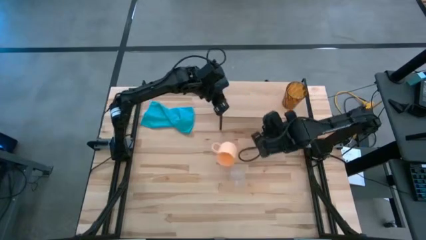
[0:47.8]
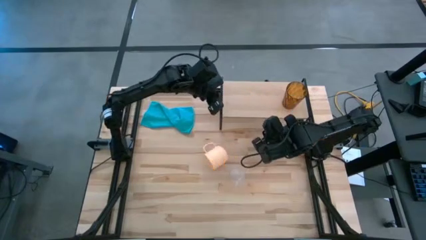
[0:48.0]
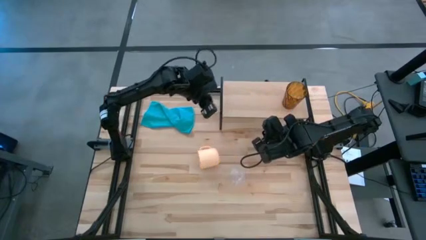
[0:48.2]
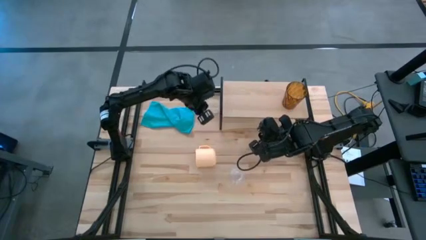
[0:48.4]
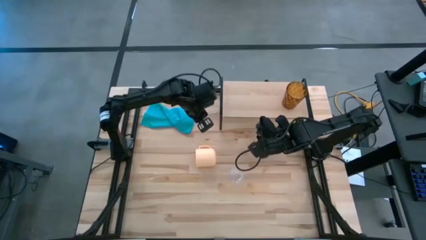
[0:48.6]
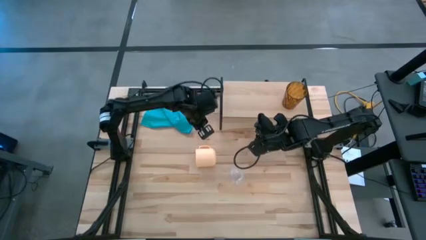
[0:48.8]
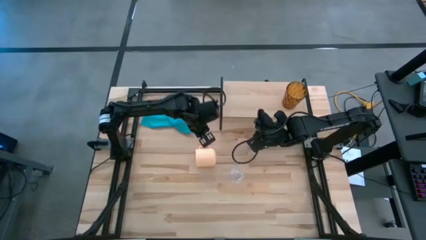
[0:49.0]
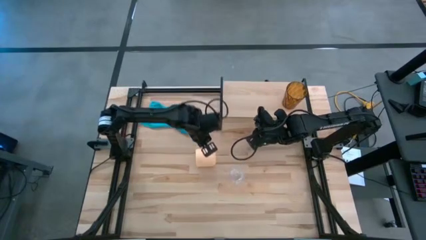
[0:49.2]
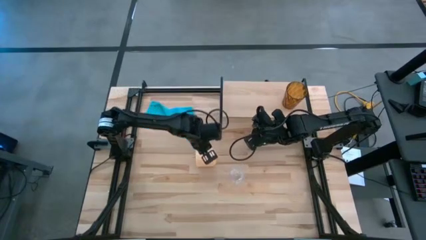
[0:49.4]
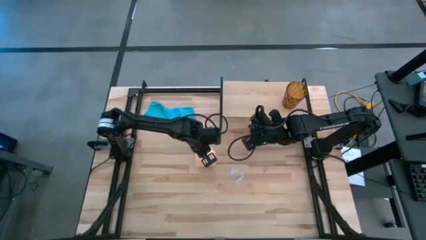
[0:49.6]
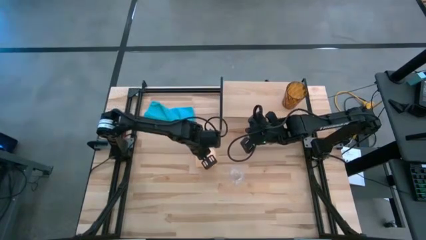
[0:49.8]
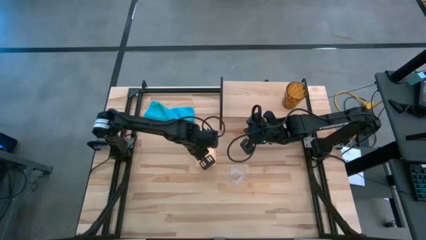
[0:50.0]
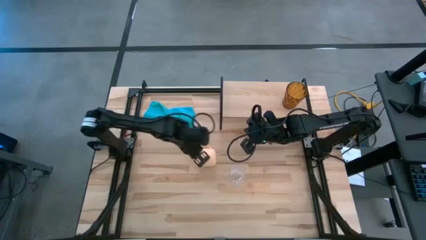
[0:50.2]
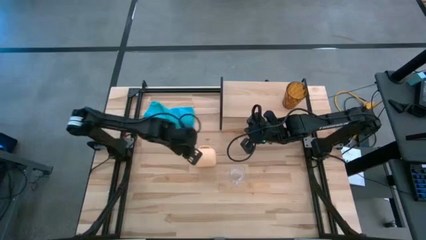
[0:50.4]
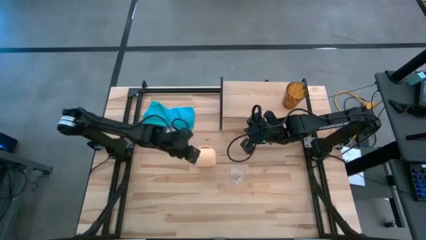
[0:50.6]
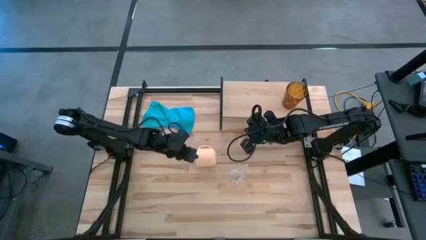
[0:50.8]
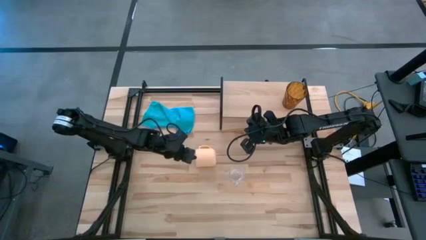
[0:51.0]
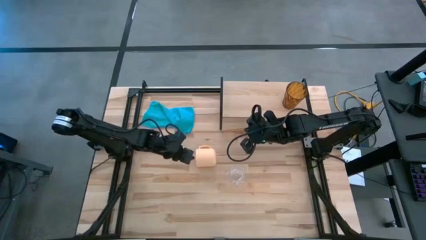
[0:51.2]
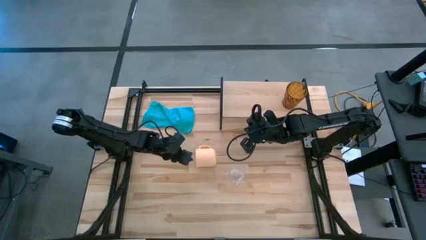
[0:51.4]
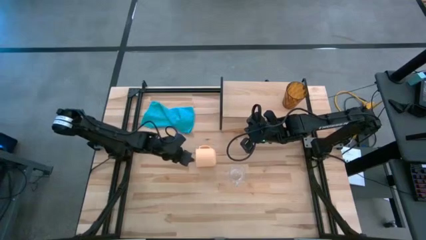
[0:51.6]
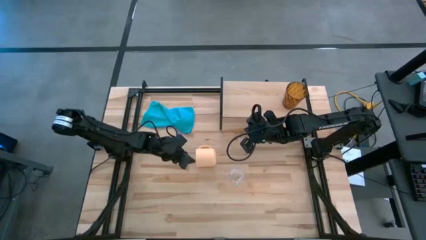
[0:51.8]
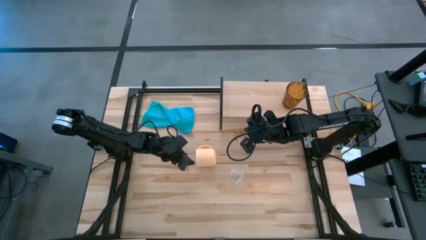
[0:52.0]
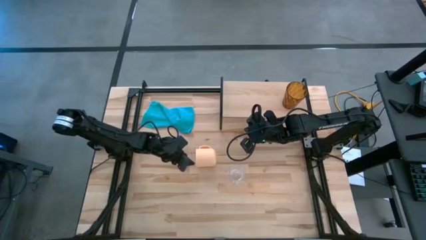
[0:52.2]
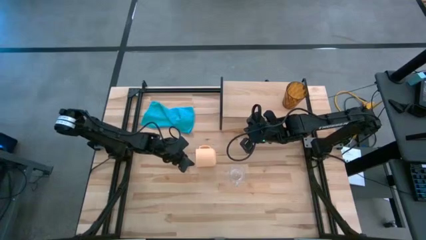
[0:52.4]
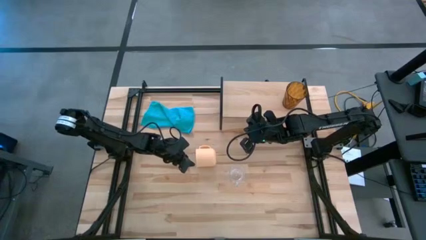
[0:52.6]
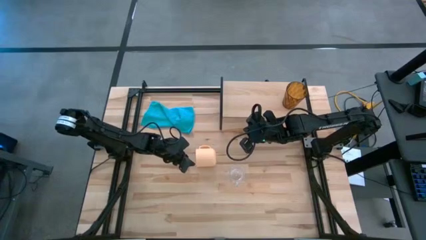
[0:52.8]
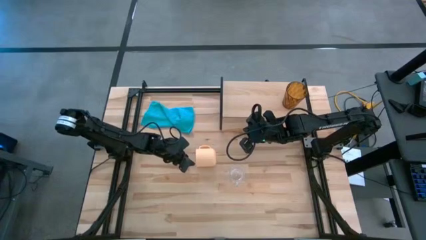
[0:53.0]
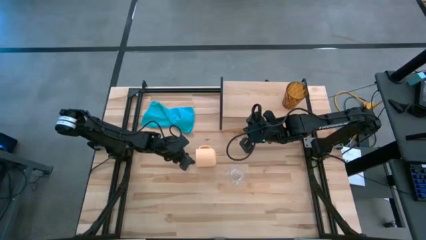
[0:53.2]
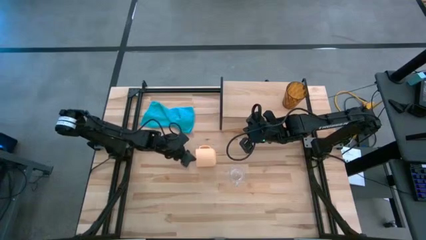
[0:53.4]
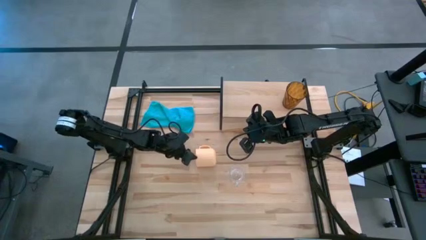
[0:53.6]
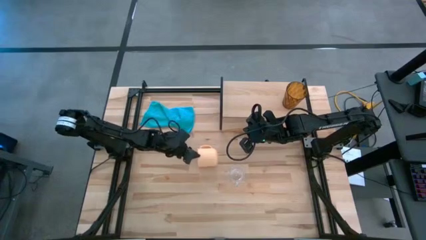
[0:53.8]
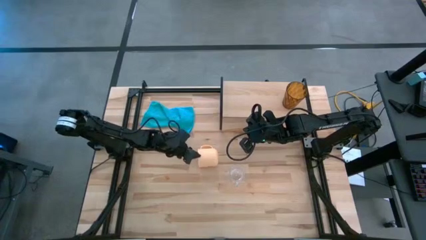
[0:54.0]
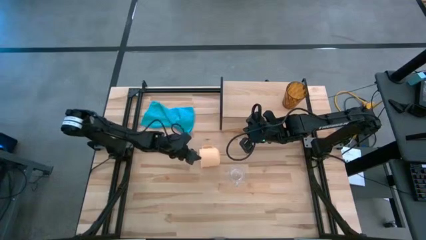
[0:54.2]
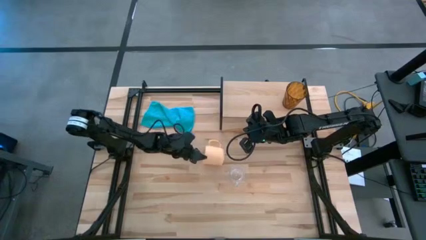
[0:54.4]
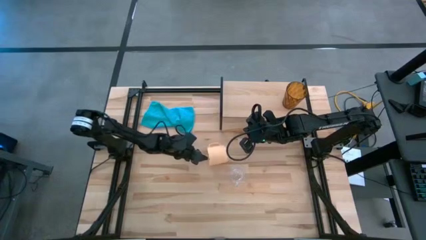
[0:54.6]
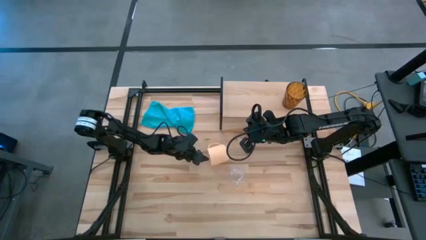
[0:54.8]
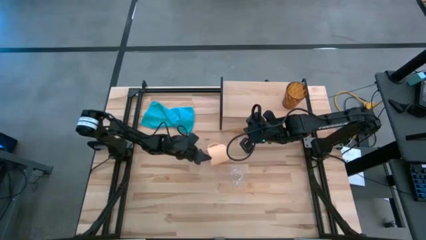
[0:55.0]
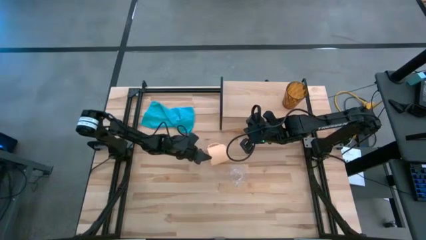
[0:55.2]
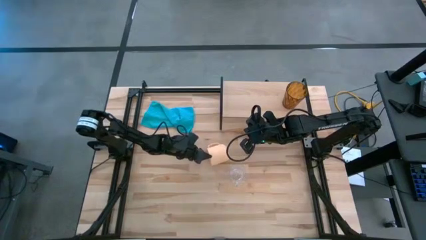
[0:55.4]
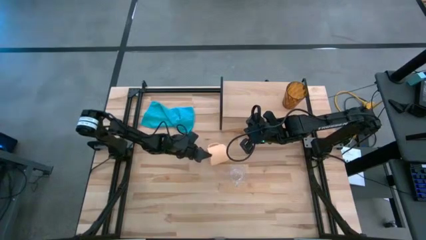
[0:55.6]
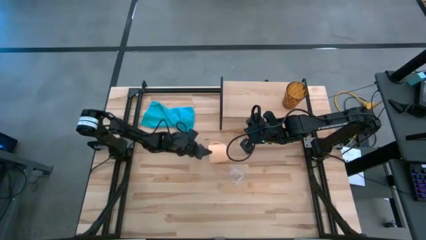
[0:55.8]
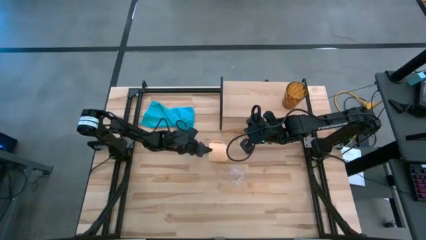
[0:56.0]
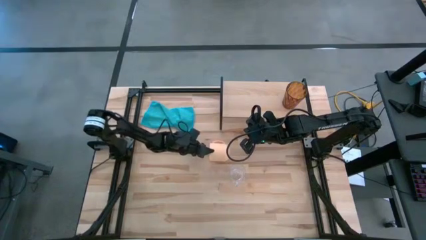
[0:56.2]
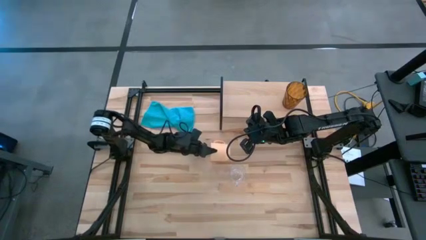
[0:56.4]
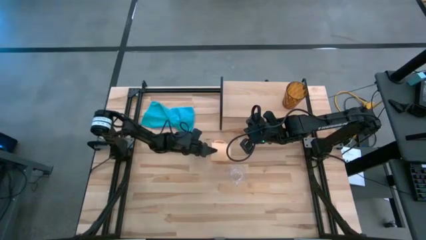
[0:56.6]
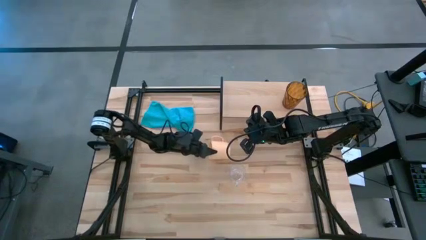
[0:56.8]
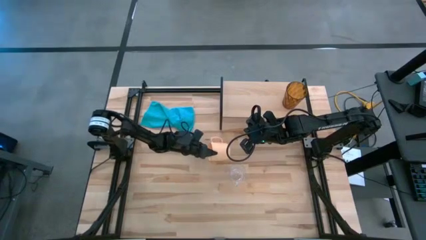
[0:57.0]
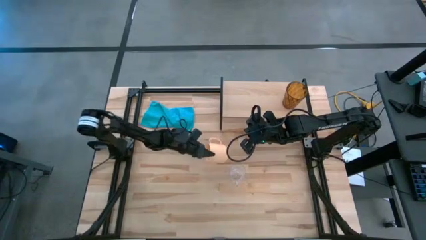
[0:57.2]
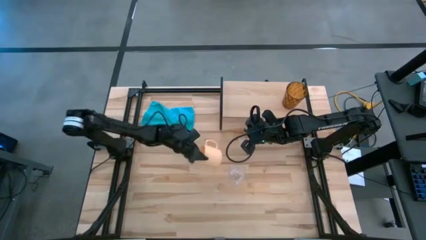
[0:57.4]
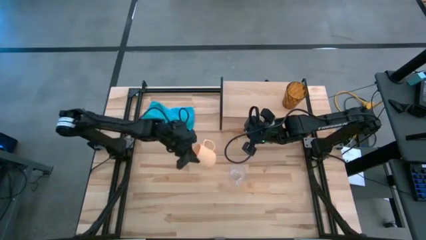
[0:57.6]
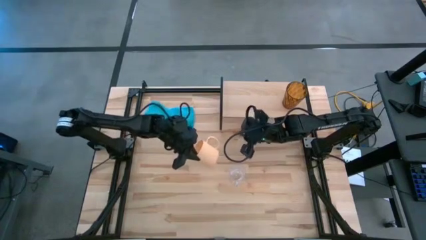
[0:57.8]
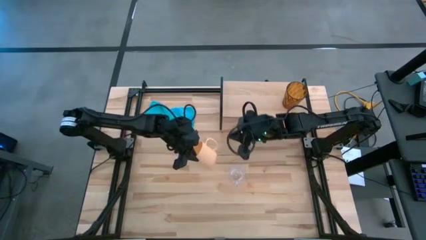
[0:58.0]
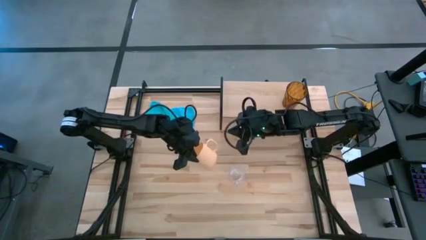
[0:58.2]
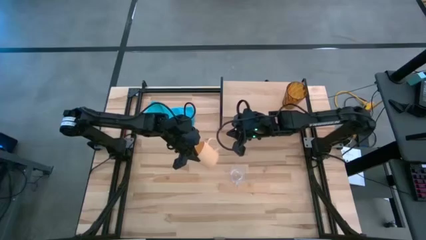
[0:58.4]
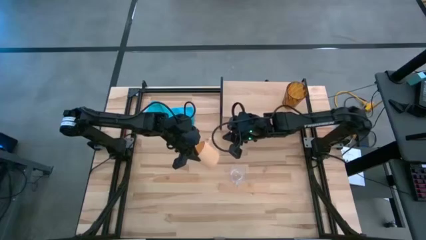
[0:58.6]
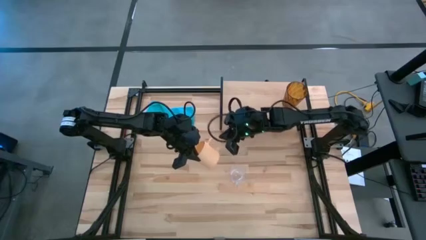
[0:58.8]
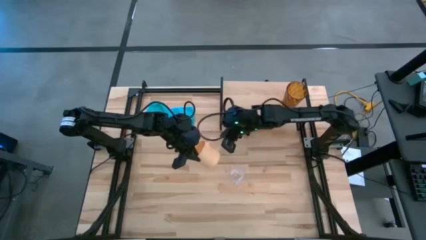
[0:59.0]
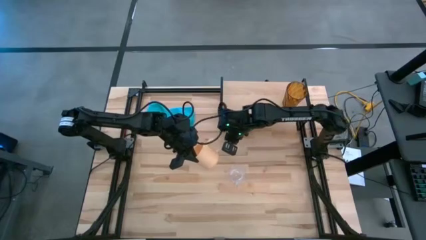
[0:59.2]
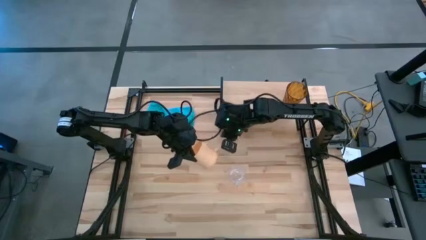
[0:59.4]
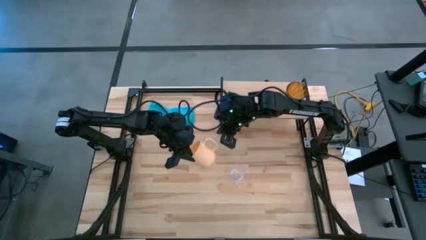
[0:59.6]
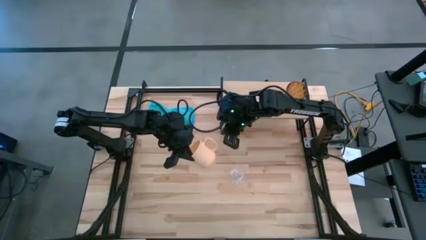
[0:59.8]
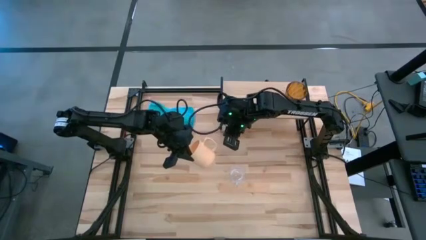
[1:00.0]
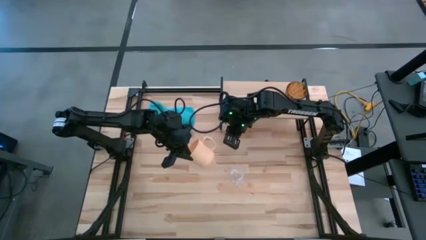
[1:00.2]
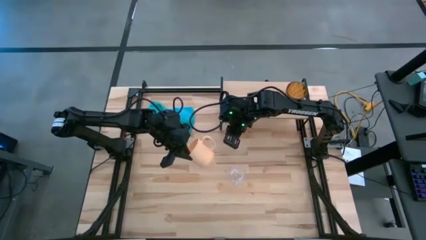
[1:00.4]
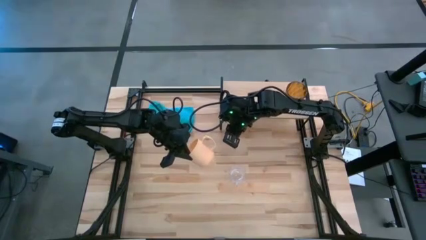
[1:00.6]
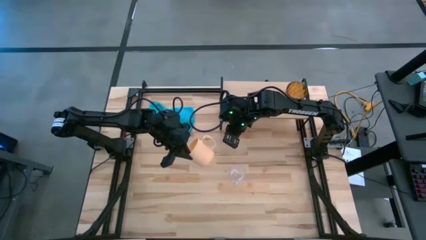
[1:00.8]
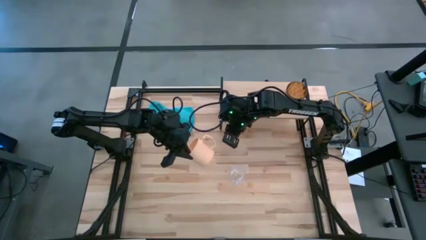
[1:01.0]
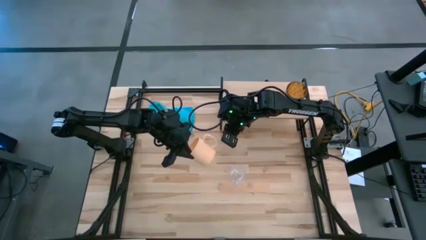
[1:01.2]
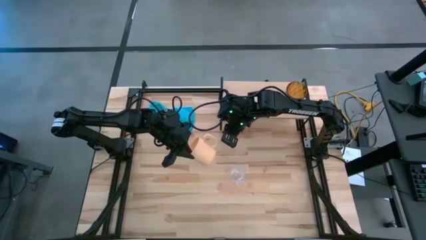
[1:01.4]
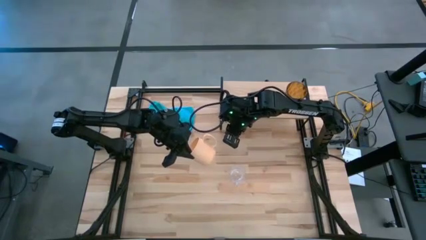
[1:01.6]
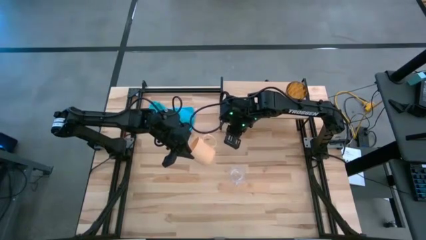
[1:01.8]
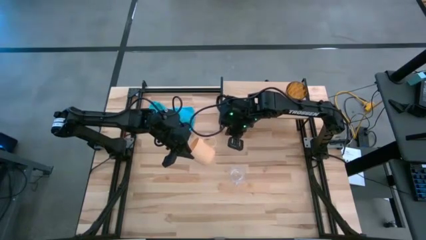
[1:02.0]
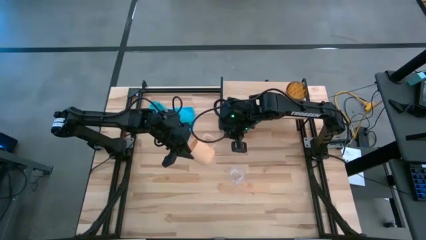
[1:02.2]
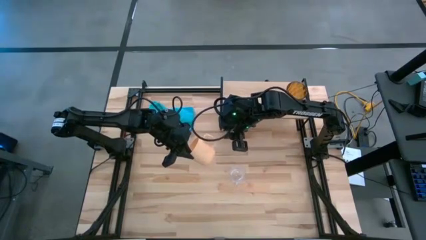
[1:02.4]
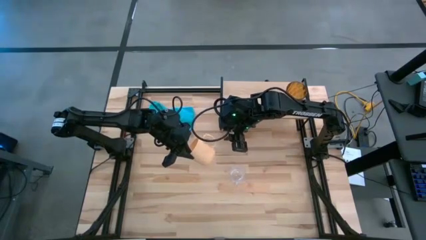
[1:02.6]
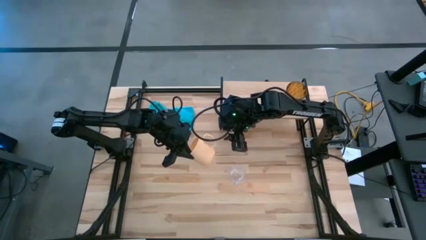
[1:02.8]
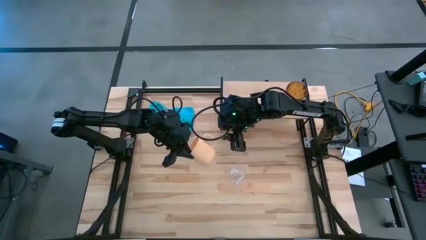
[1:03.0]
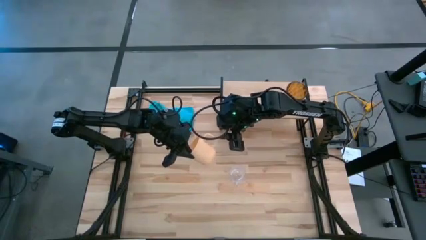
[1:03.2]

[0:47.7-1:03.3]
Task: Stack small to large cups/mugs on shelf
Put the yellow mug on the shelf
